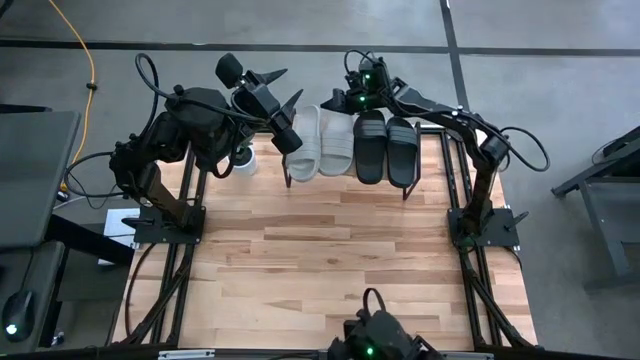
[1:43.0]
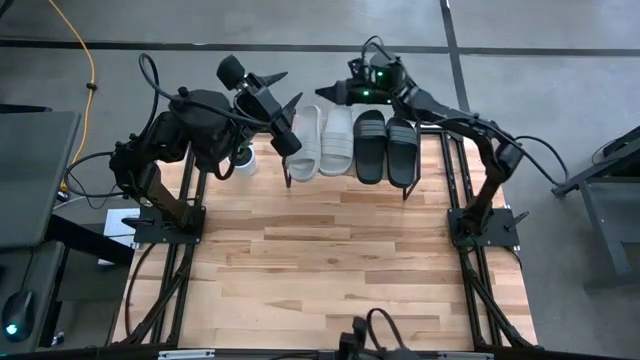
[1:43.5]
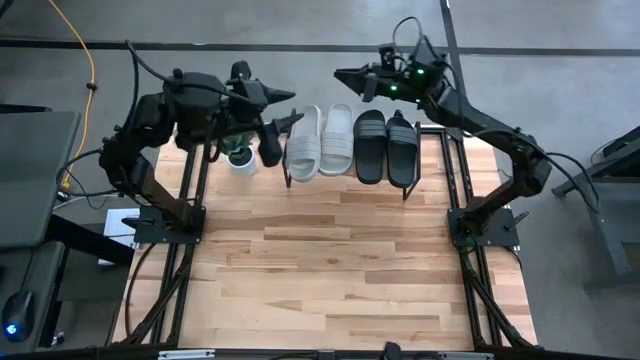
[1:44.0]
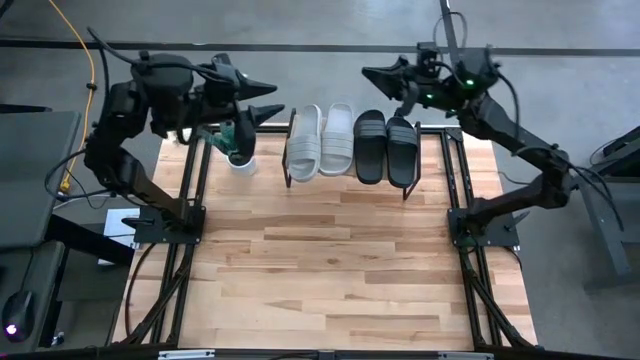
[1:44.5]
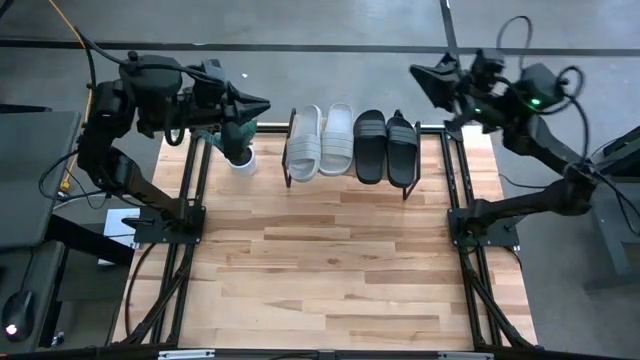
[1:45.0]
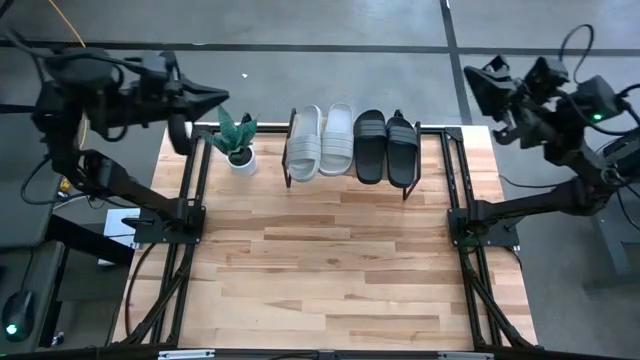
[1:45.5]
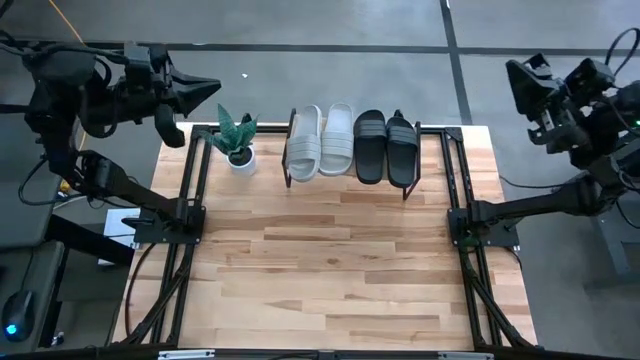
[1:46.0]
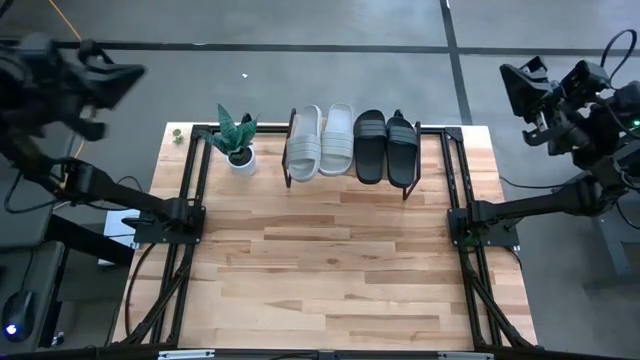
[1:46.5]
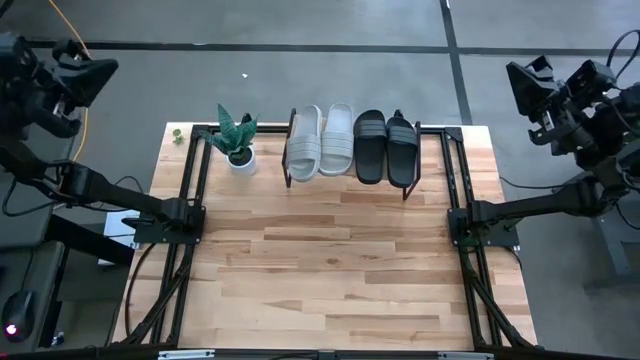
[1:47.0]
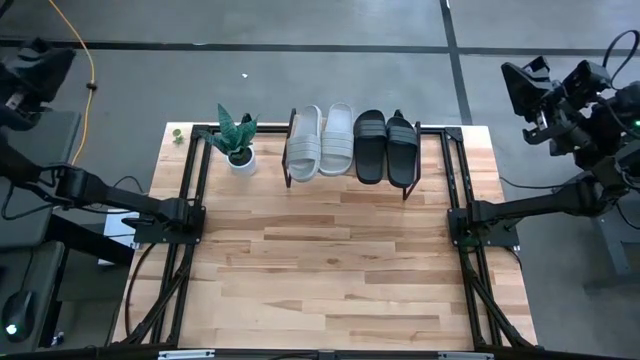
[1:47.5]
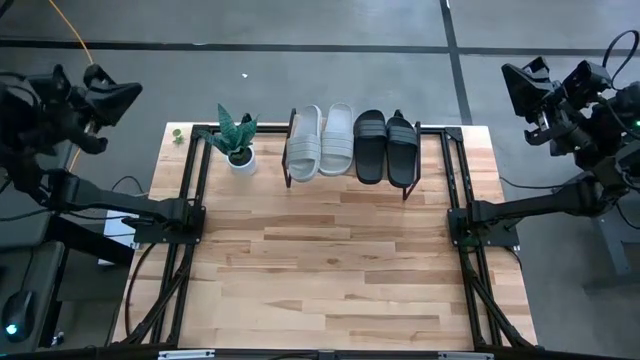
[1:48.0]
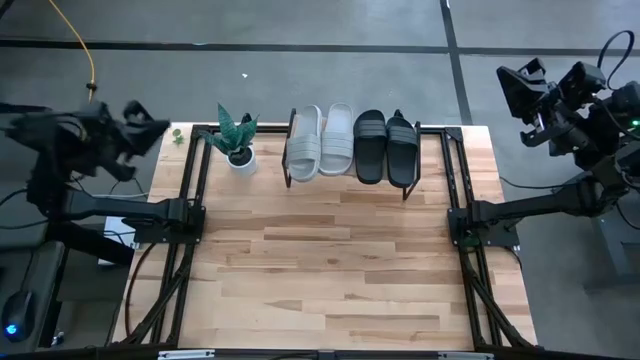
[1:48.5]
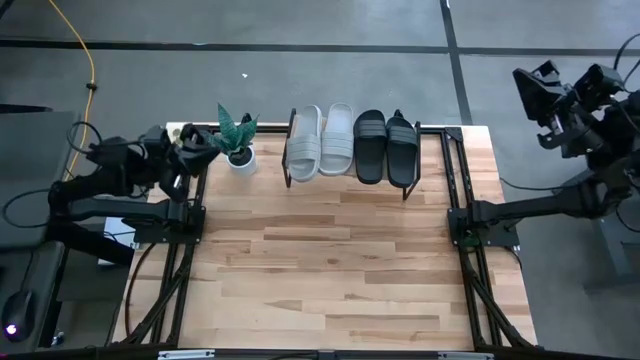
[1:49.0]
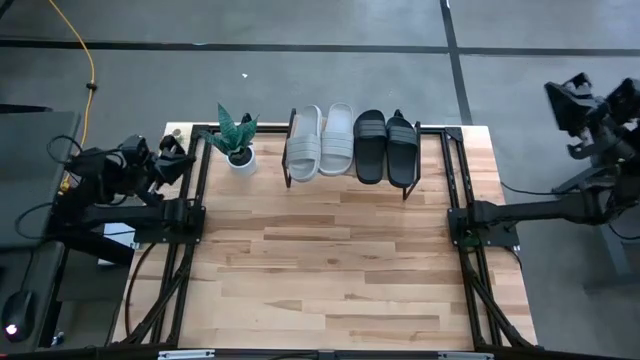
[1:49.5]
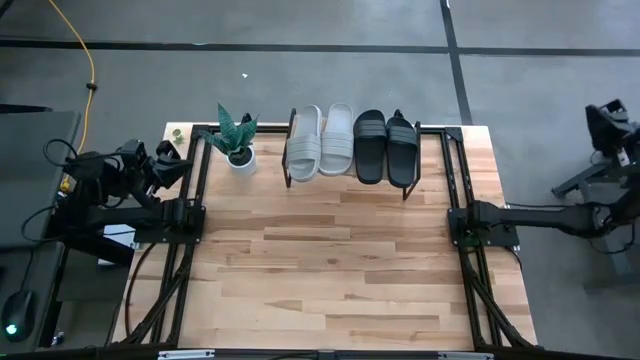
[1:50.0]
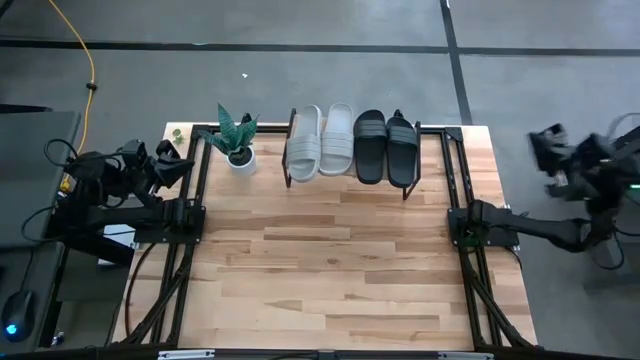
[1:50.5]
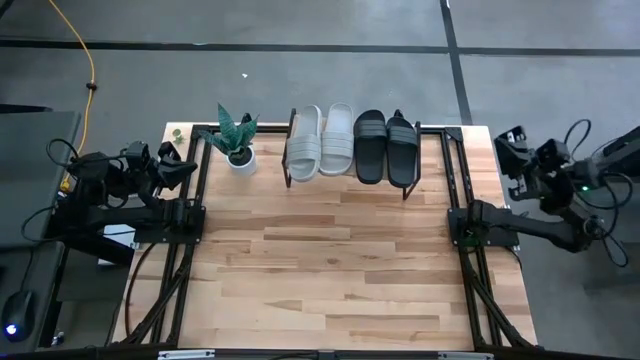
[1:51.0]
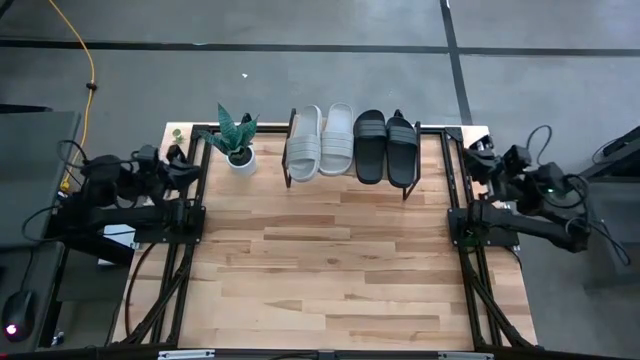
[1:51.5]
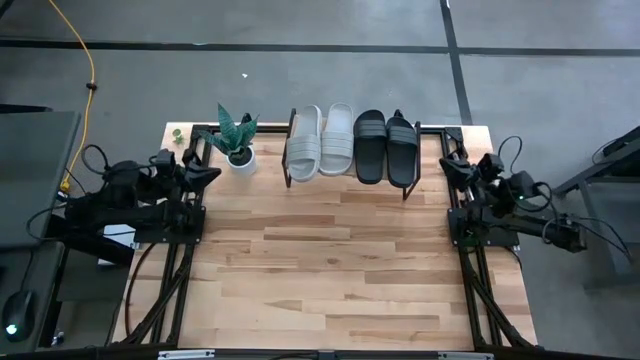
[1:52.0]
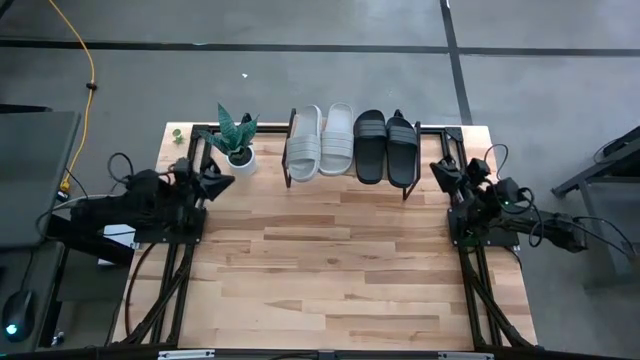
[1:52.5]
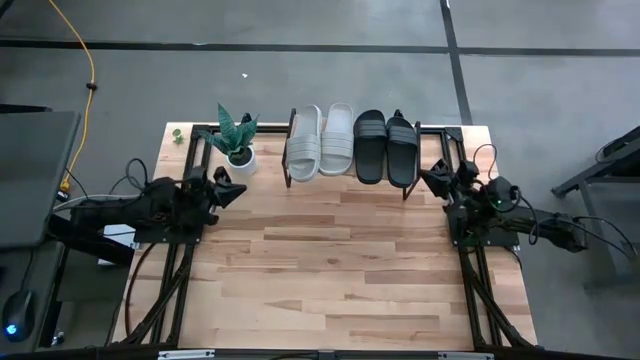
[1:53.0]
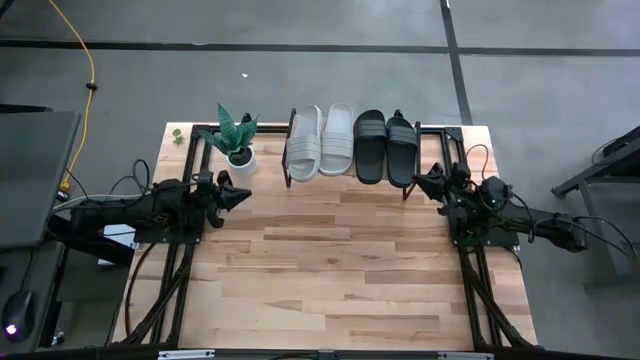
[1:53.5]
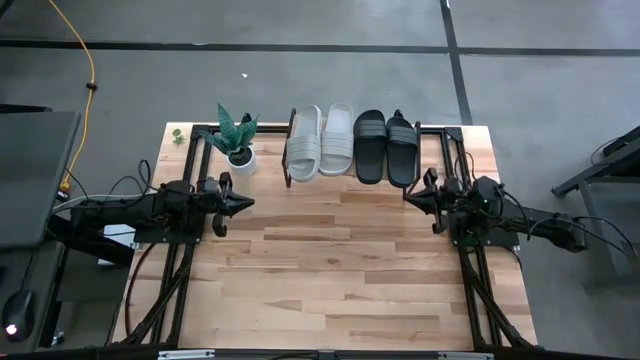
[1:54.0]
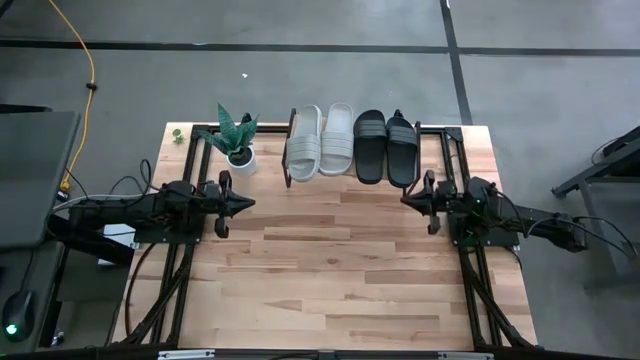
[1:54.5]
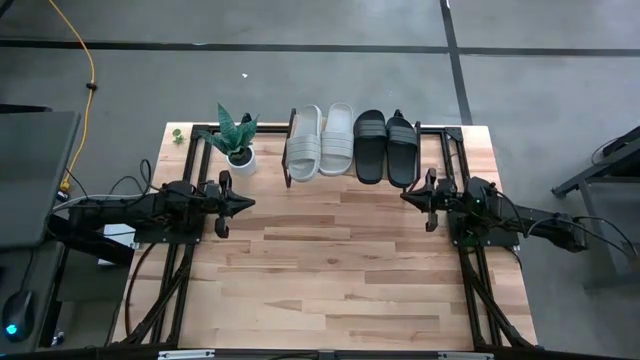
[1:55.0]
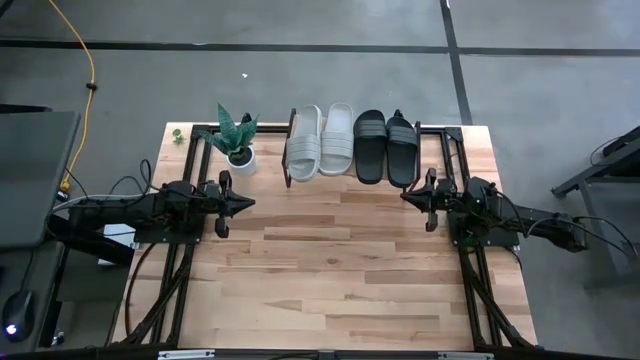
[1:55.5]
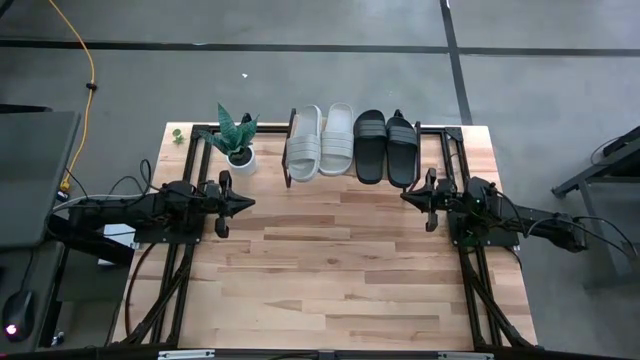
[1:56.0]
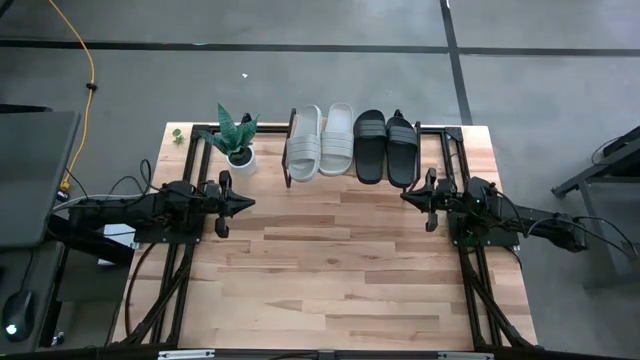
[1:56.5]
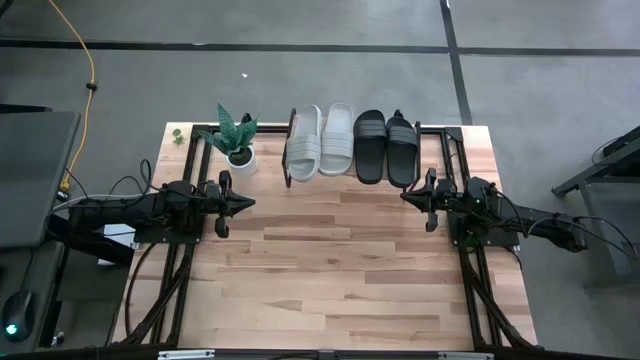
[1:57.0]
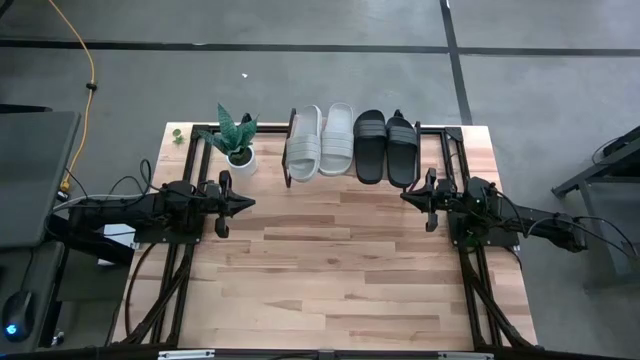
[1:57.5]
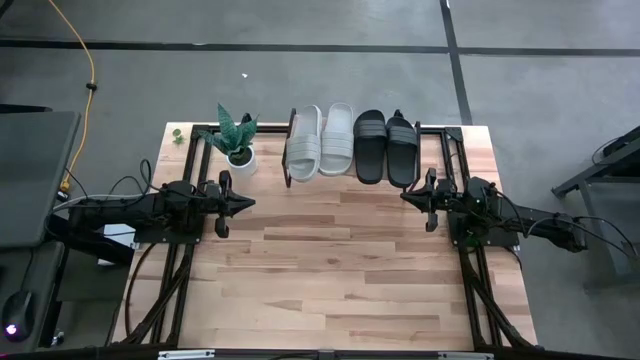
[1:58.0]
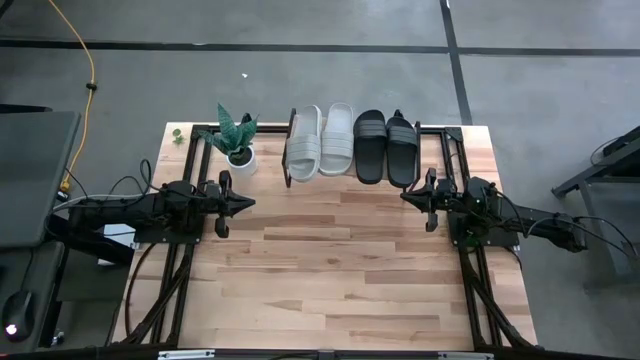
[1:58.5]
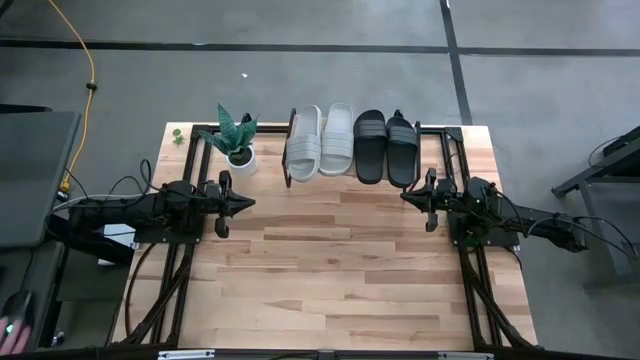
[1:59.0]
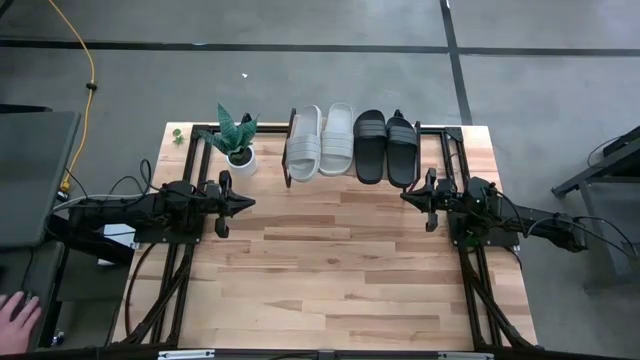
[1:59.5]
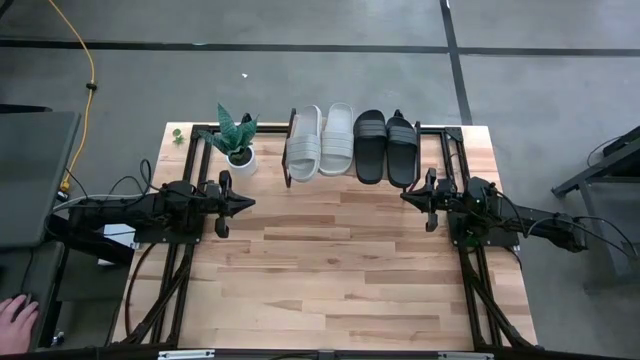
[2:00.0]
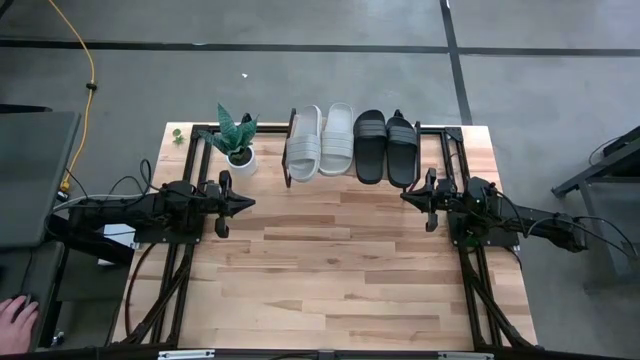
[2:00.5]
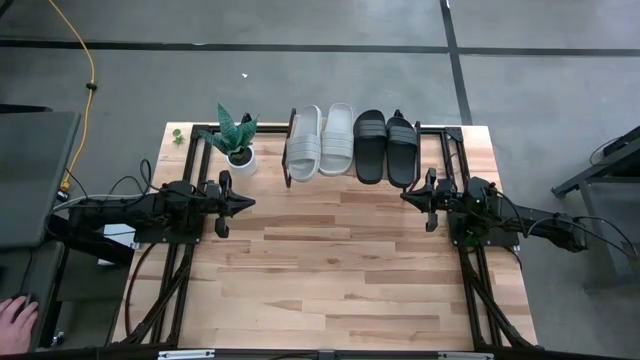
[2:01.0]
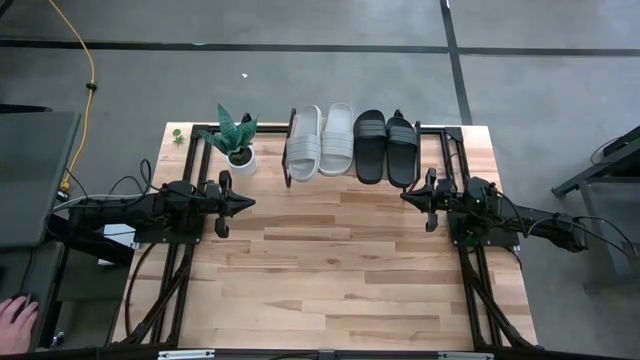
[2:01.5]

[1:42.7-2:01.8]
Task: Pick and place slides into the shelf
Return to Home Position

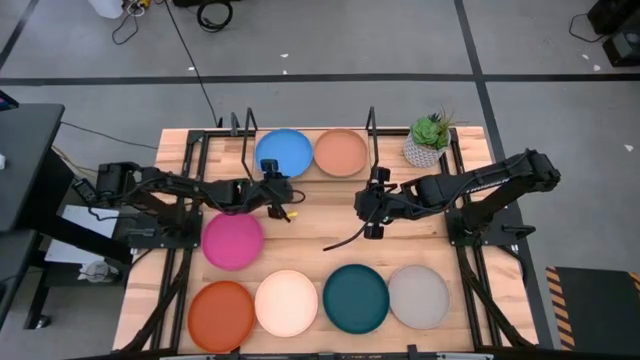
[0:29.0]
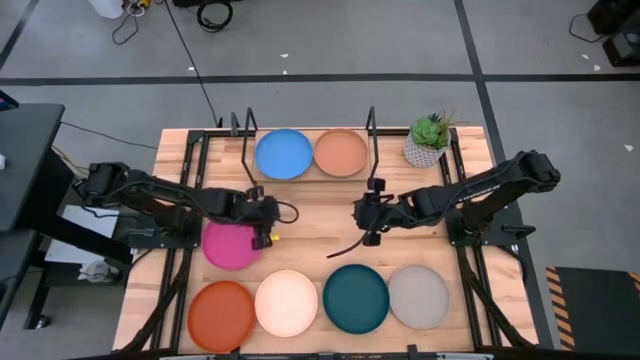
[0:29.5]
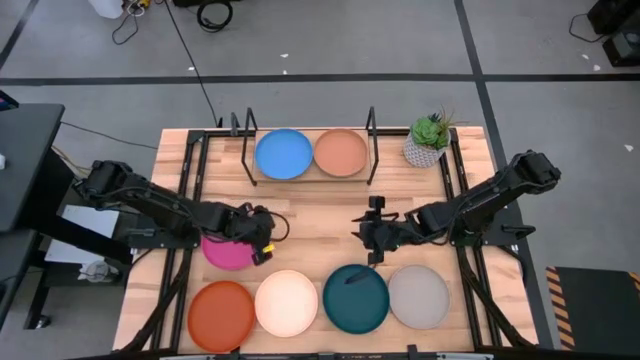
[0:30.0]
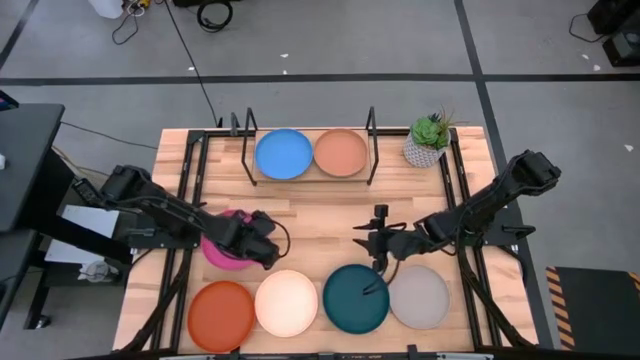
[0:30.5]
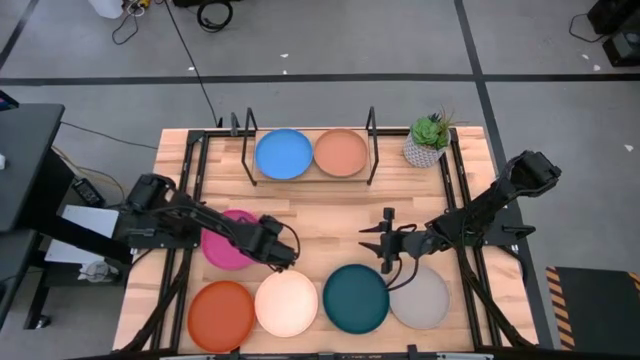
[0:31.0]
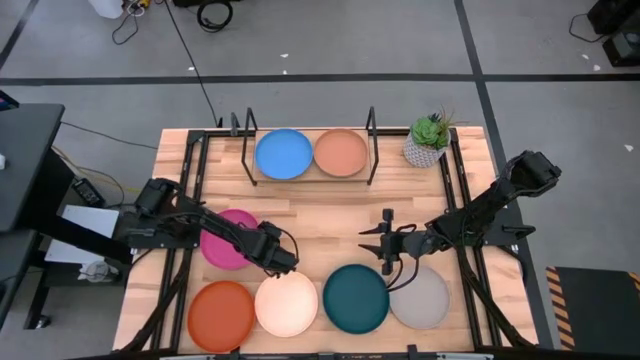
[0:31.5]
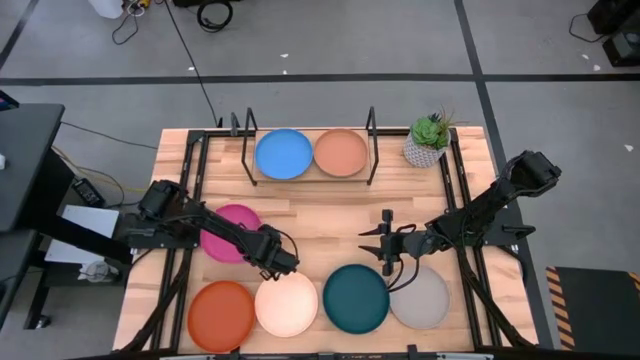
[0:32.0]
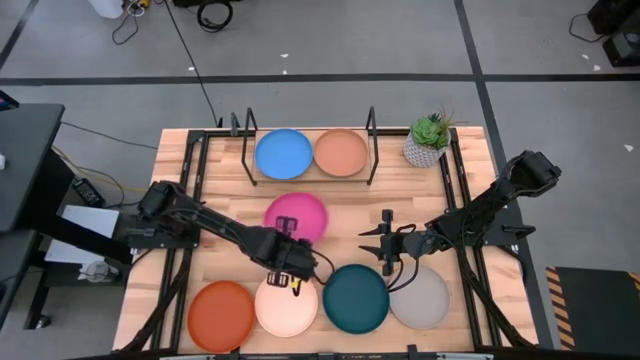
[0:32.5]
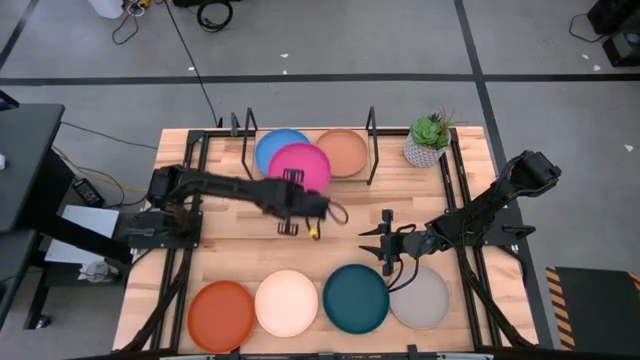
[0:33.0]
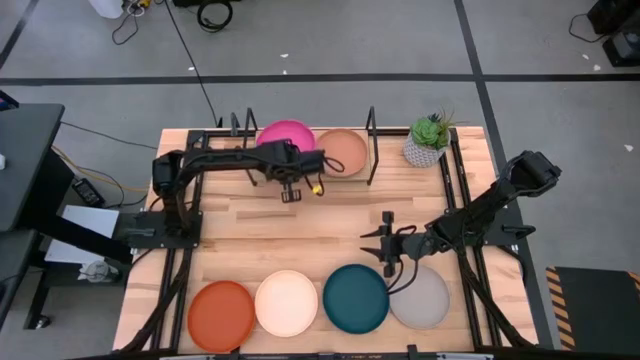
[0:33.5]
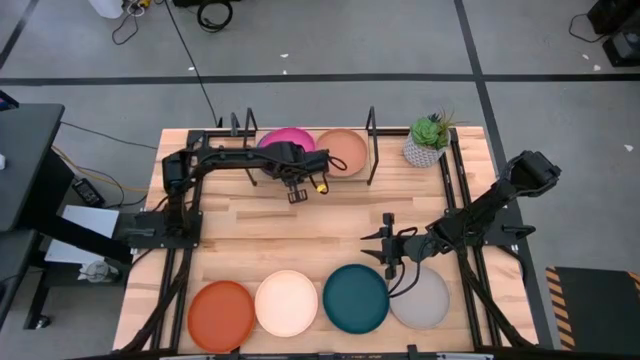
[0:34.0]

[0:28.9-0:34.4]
Task: Place and stack plates onto a shelf
Stack the pink plate on top of the blue plate on the shelf
